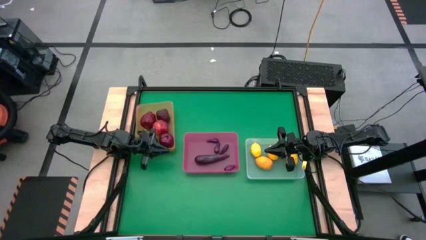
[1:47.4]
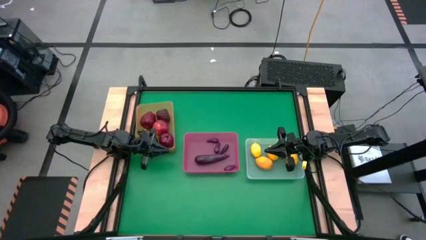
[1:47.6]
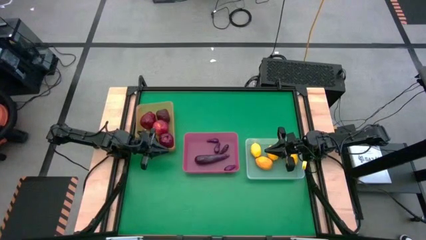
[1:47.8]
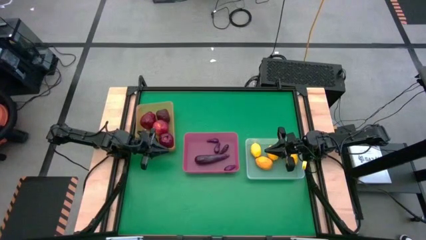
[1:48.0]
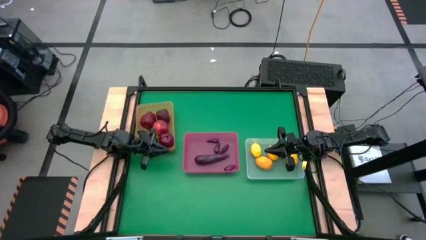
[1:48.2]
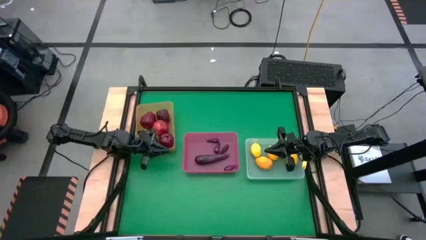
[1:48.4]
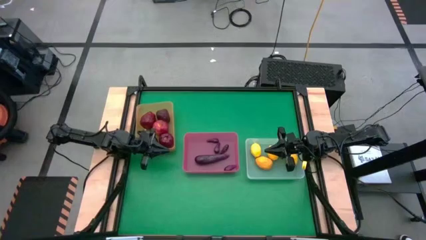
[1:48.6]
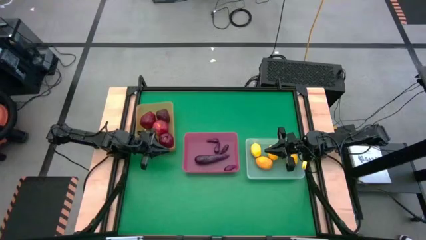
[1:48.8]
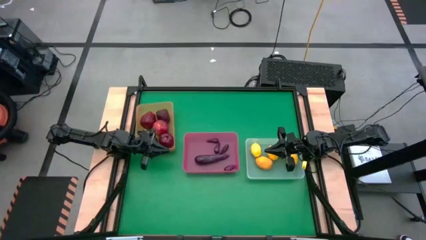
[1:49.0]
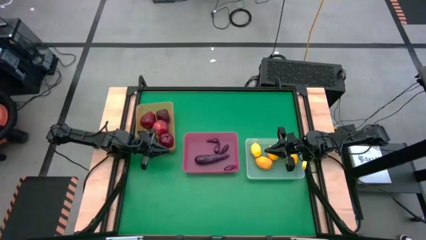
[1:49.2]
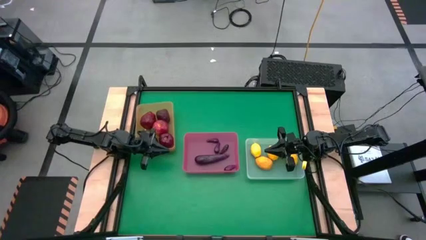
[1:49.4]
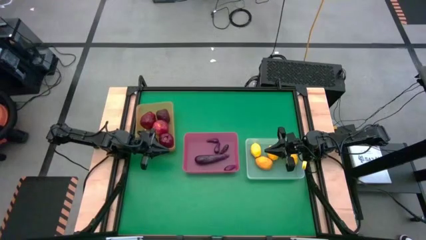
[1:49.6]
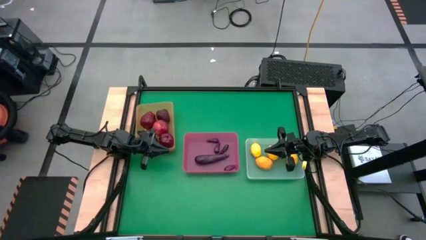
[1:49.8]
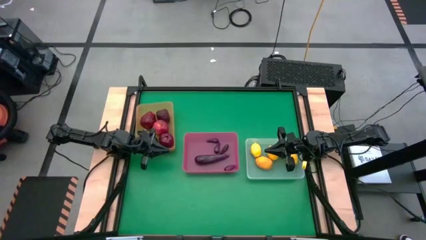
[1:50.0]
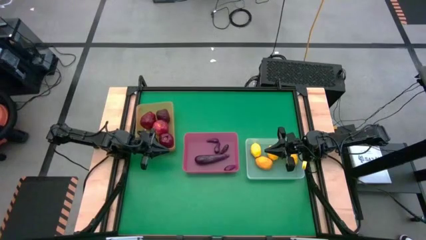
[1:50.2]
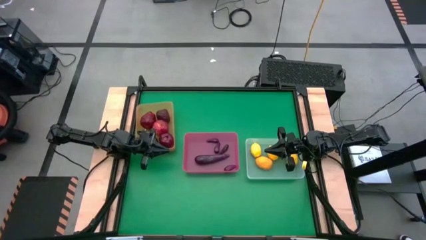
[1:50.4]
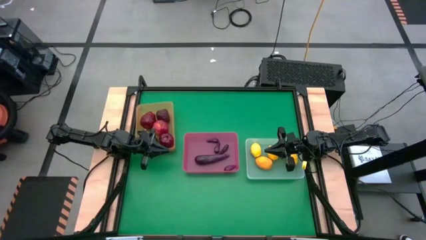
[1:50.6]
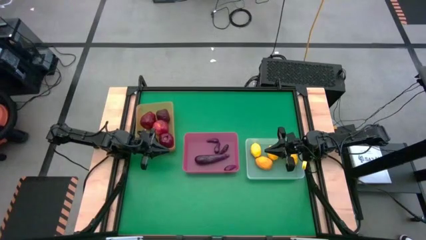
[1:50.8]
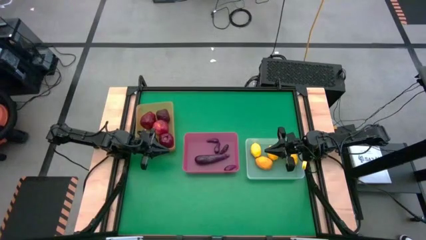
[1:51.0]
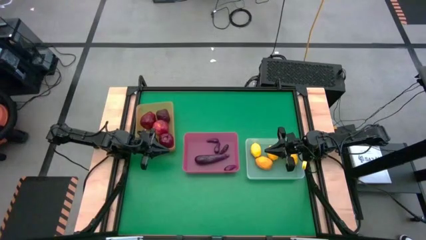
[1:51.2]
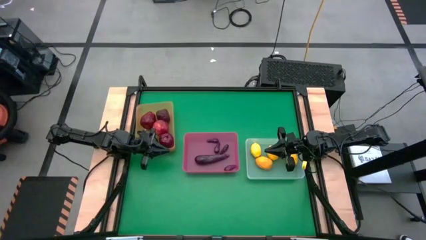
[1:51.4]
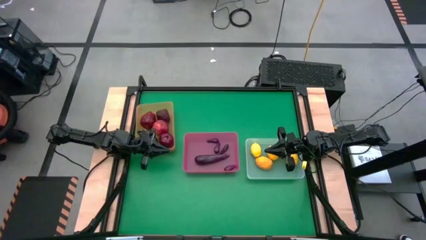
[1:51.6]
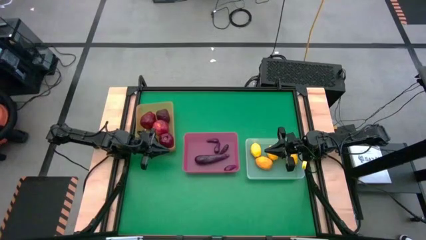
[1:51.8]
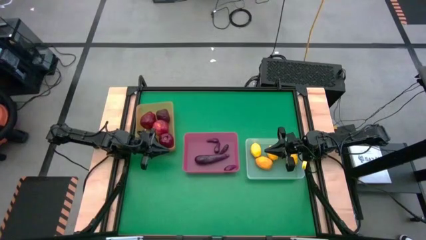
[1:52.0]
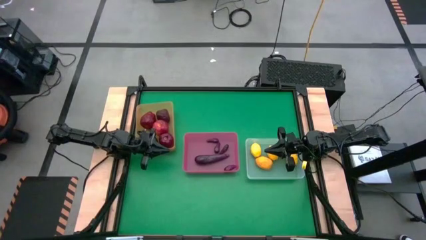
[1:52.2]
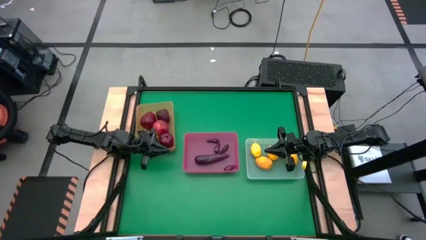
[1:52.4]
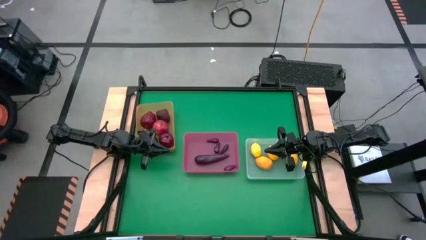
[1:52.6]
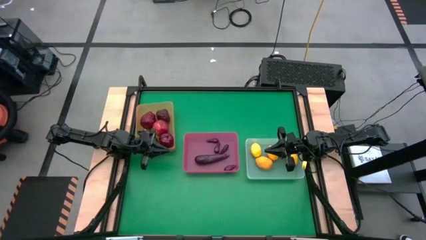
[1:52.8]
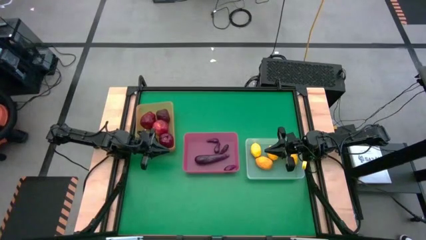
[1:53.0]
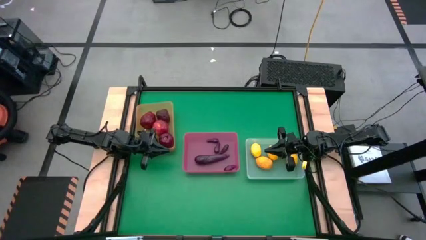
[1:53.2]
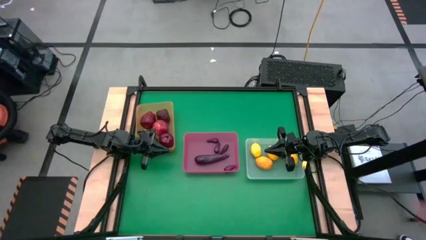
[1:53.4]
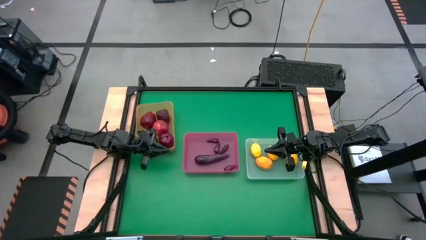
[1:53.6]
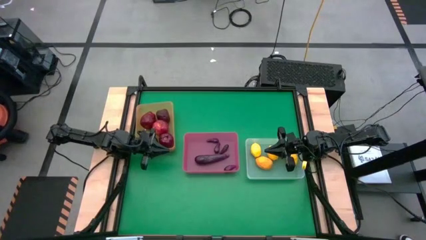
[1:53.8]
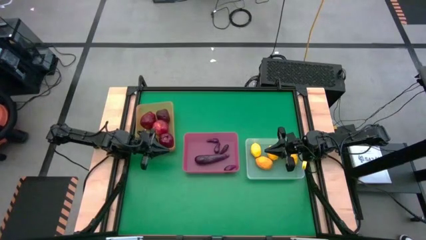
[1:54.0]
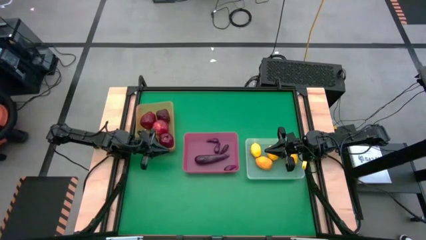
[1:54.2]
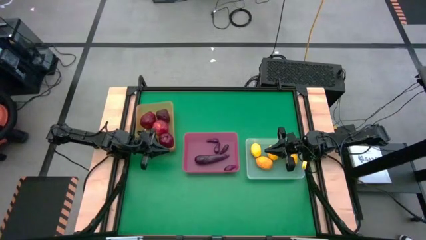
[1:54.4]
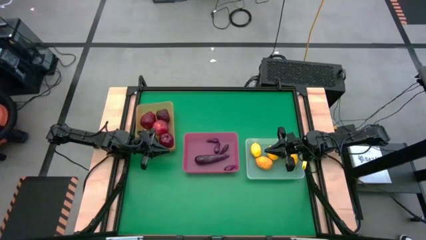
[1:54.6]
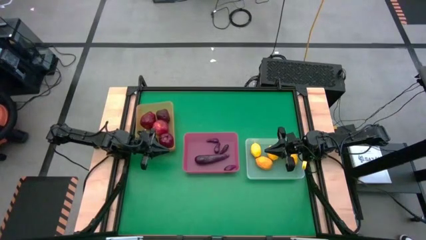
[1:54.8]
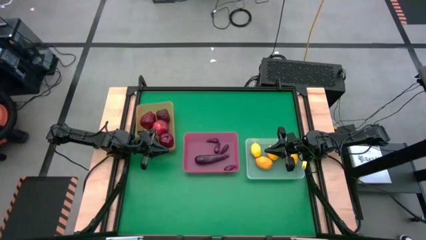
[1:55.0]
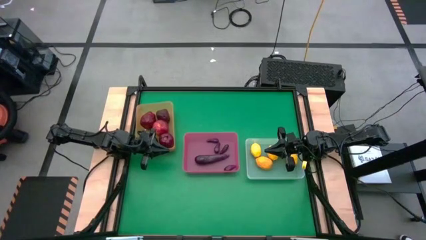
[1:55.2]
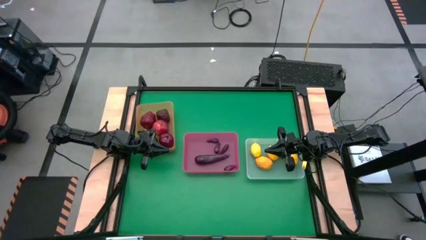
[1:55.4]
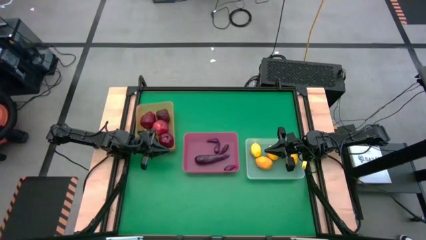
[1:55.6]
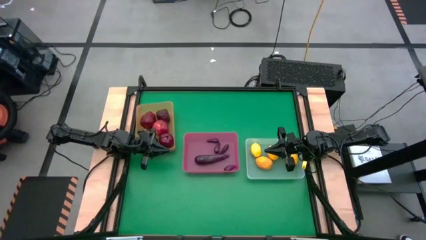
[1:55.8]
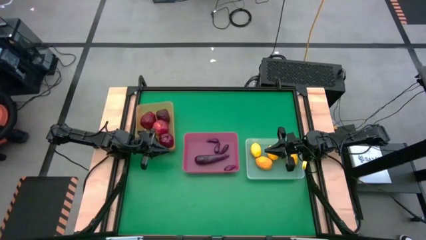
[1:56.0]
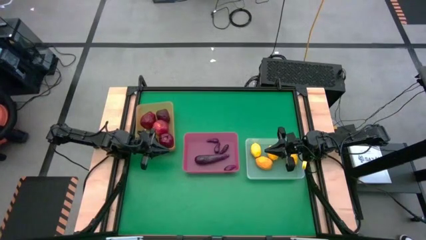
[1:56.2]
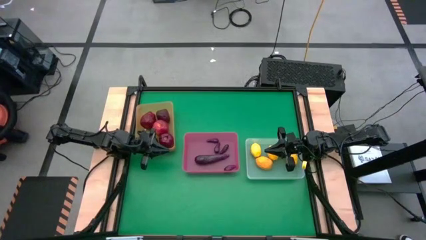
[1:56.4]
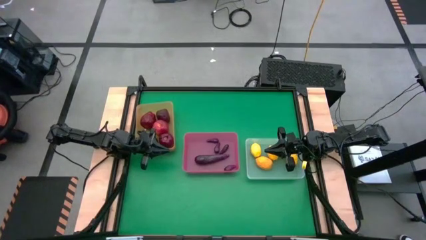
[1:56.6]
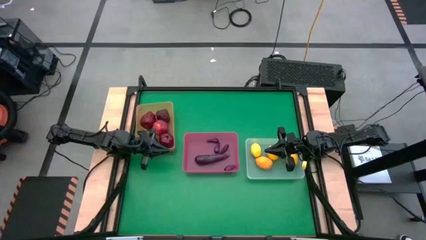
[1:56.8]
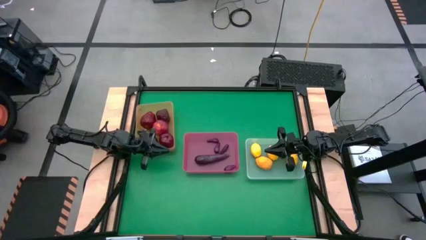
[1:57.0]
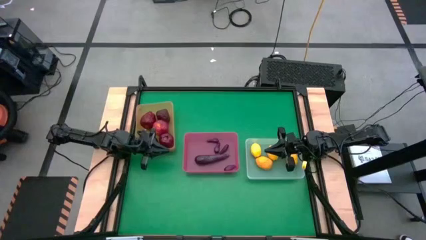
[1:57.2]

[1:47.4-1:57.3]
Task: Sort produce into baskets
Return to Home Position

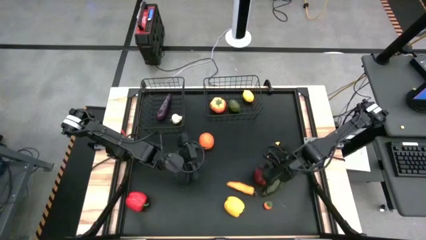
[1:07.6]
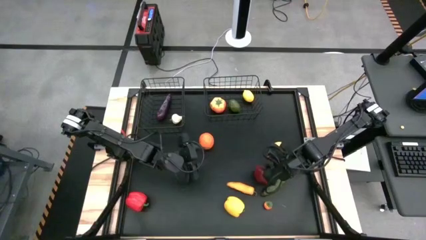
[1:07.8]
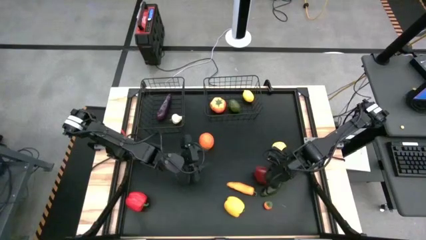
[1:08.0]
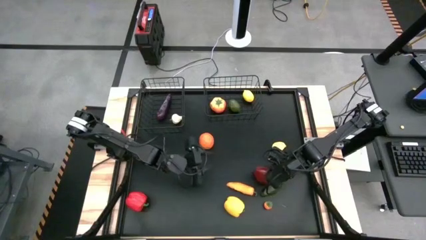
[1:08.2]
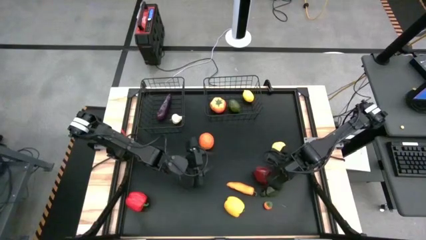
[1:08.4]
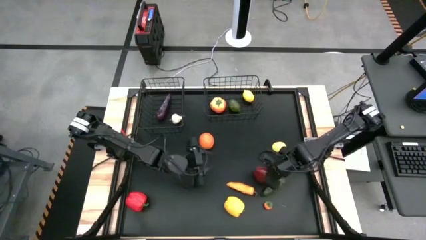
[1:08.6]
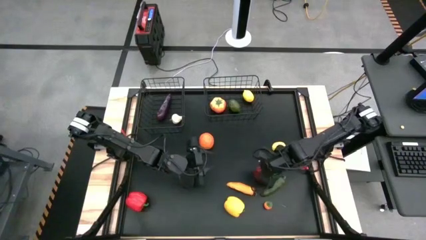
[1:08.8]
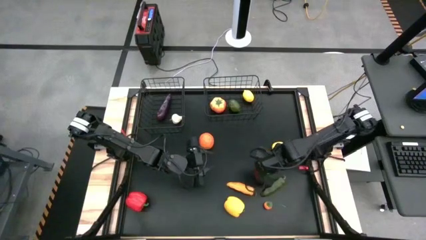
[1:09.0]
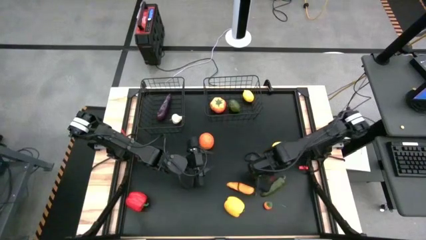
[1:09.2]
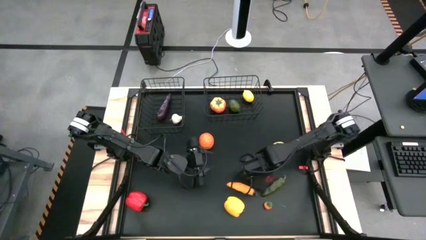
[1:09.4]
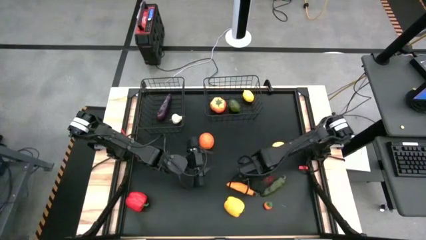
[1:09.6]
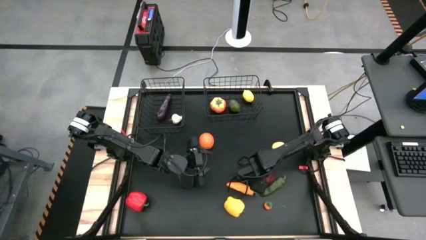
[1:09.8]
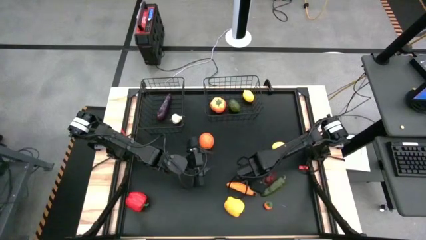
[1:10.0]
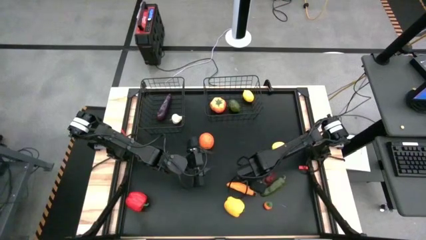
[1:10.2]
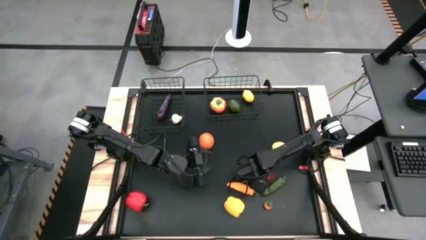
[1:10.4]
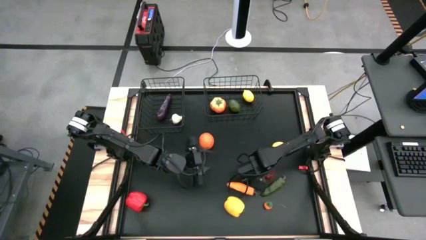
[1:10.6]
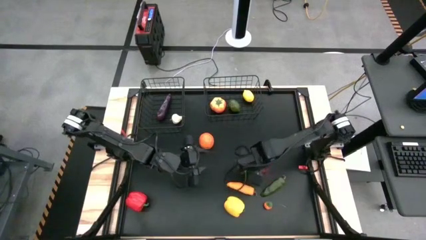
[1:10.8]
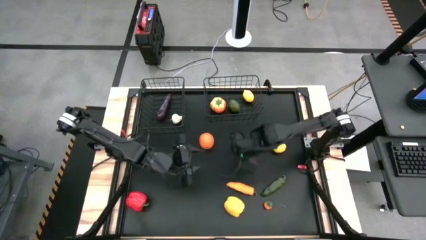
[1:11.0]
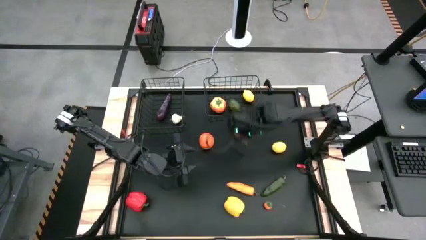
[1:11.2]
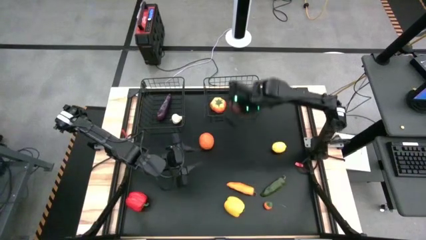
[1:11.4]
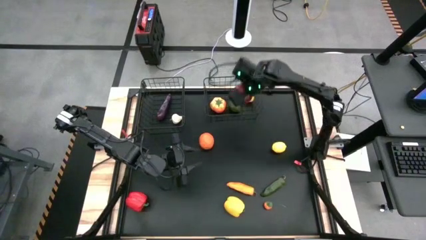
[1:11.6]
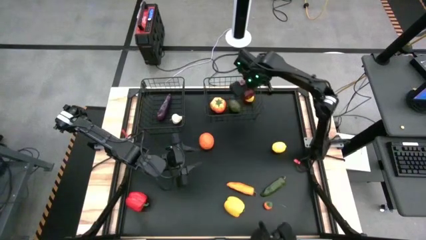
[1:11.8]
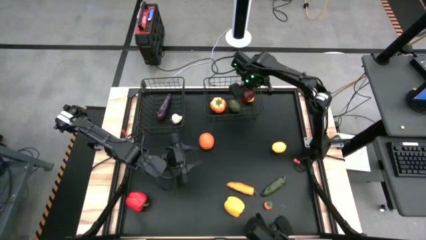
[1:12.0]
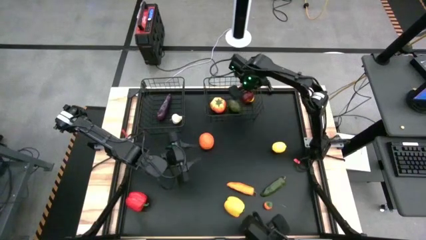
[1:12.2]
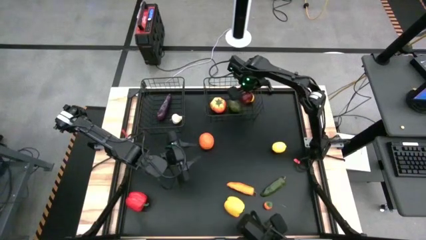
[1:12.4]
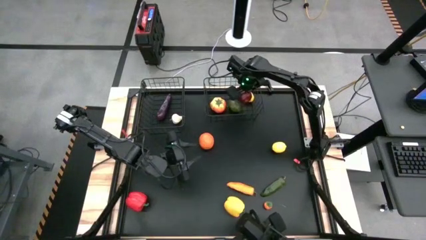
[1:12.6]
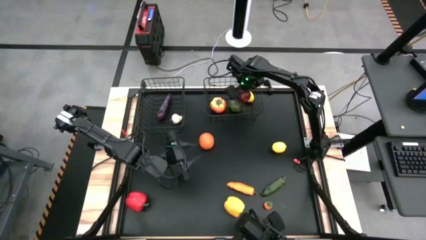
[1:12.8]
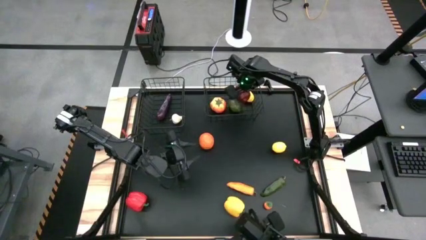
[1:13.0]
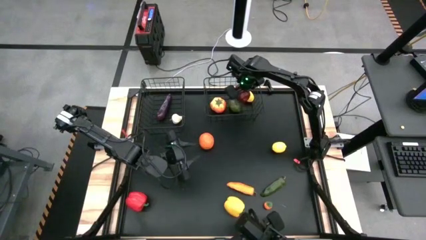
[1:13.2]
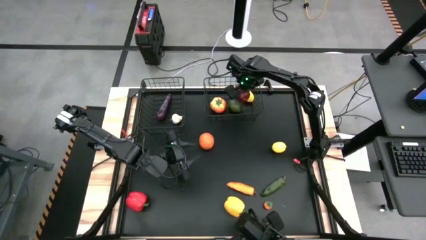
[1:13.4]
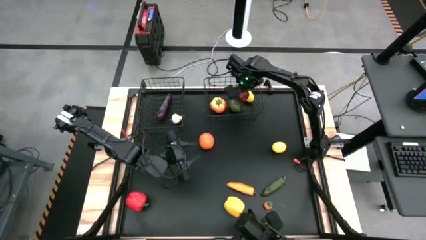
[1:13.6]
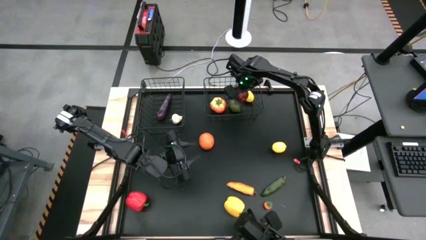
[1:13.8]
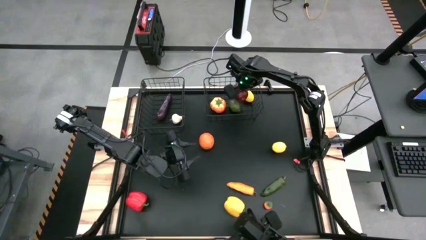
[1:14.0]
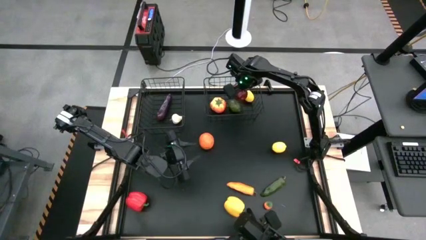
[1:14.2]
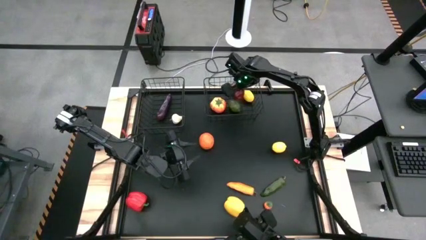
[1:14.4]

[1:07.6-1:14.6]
Task: Sort produce into baskets
Put the red apple into the right black wire basket
